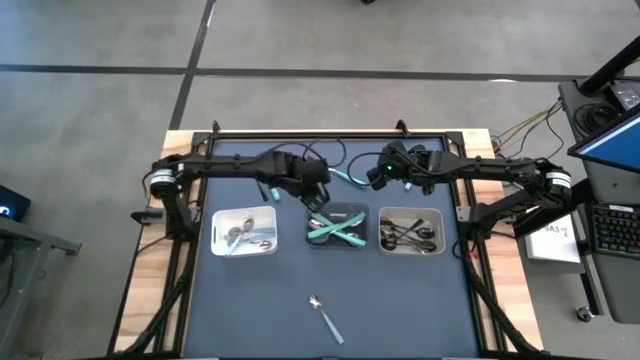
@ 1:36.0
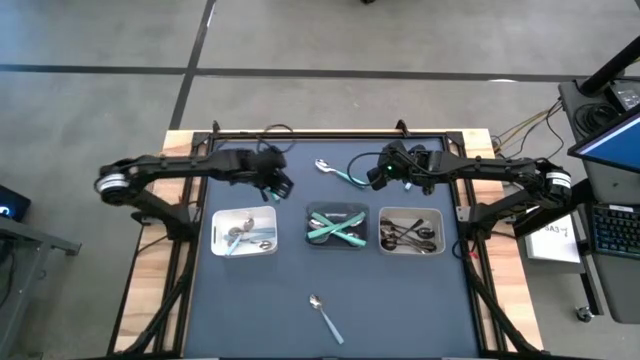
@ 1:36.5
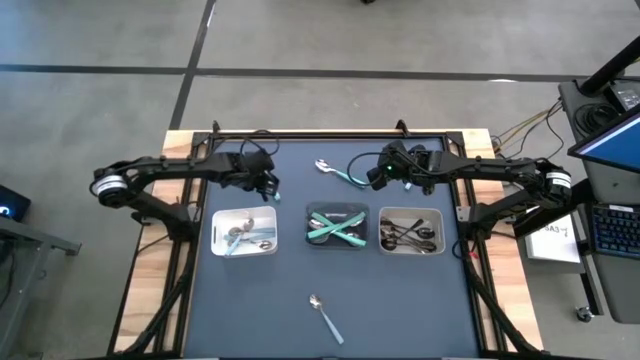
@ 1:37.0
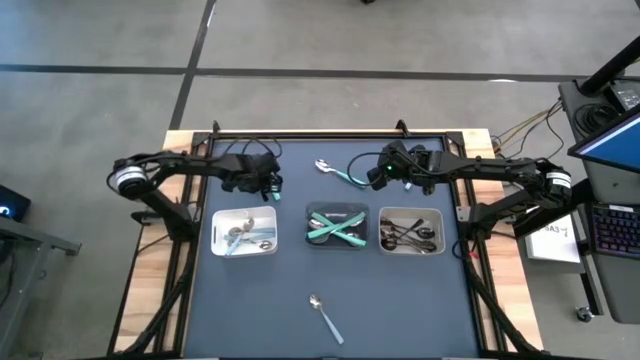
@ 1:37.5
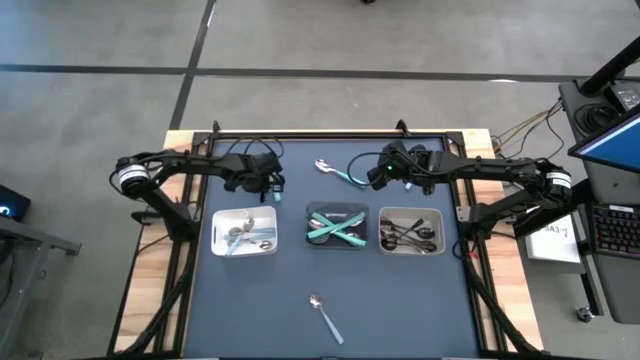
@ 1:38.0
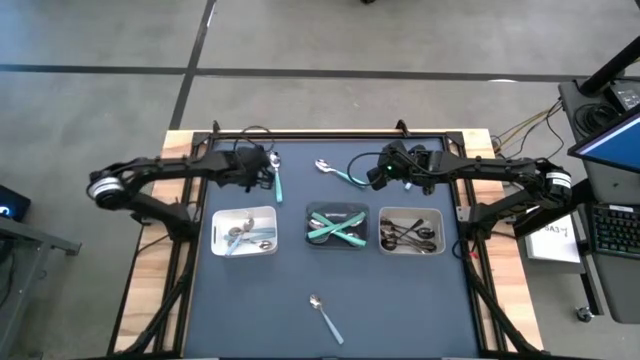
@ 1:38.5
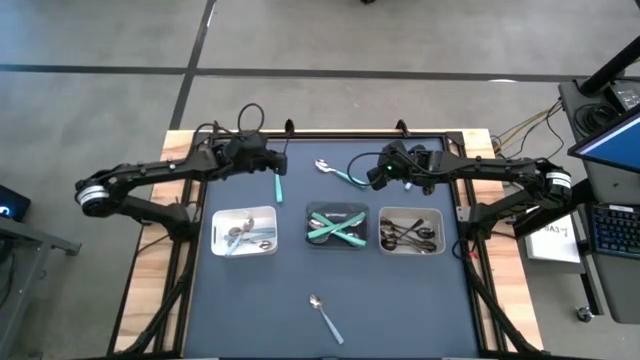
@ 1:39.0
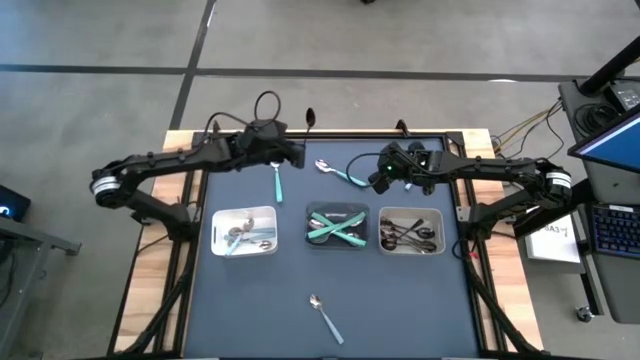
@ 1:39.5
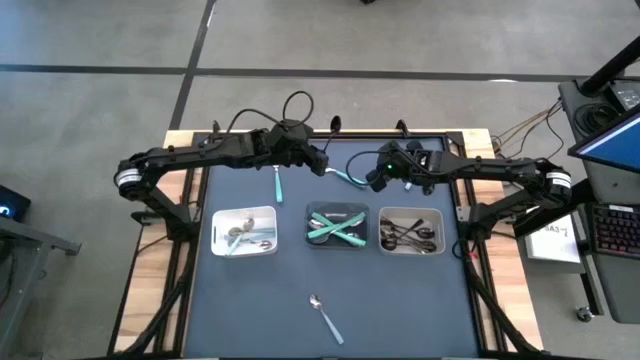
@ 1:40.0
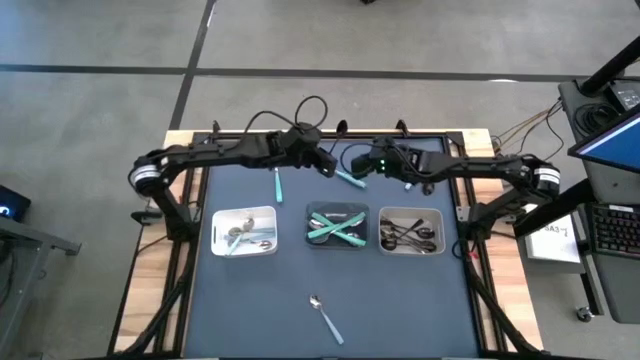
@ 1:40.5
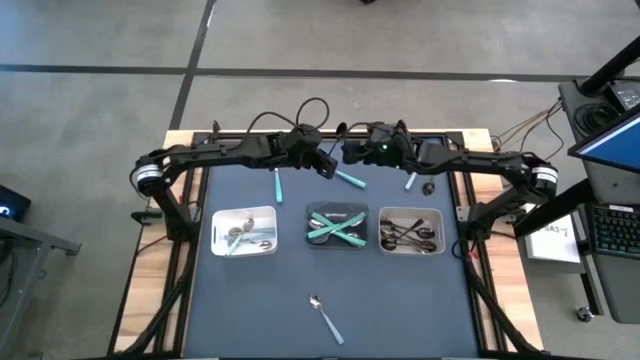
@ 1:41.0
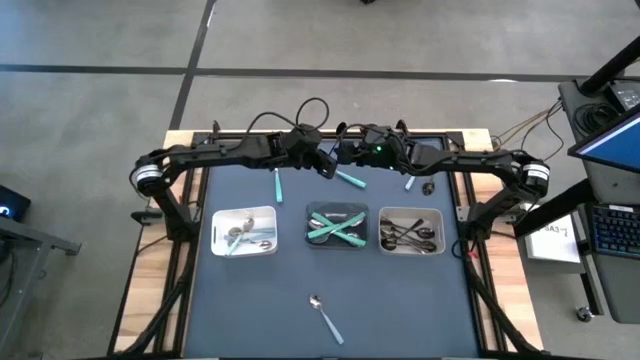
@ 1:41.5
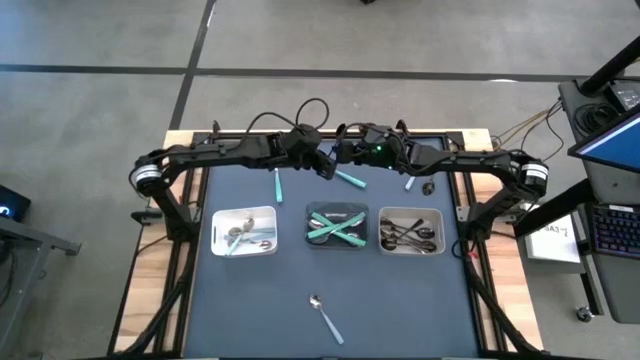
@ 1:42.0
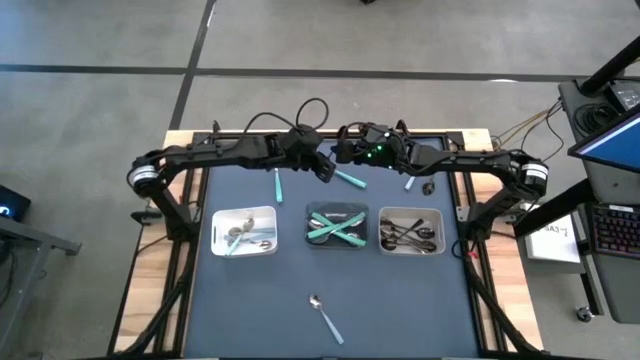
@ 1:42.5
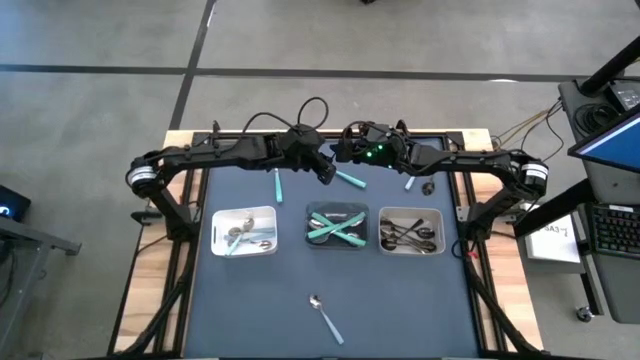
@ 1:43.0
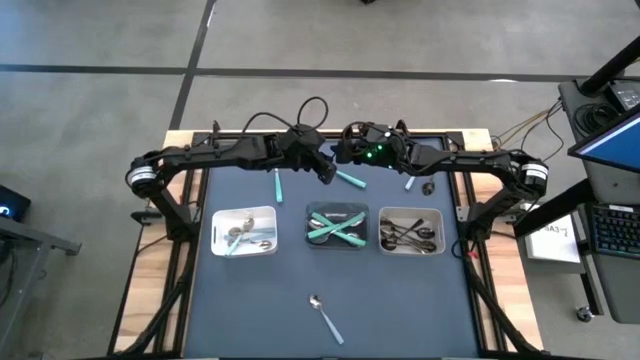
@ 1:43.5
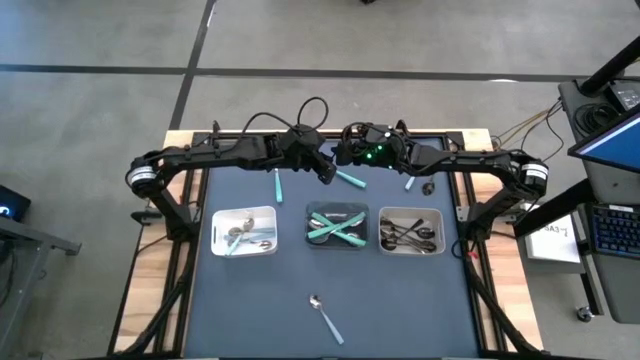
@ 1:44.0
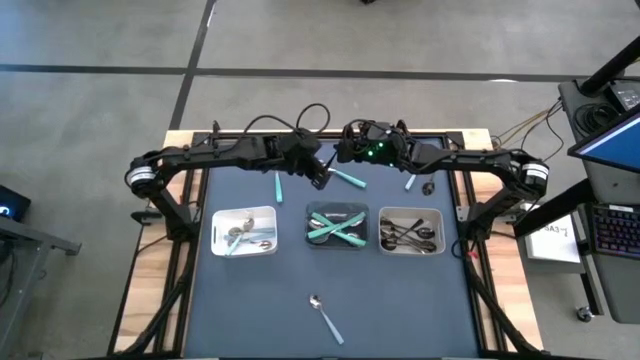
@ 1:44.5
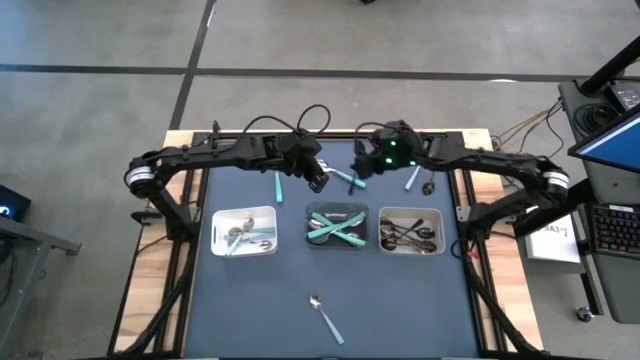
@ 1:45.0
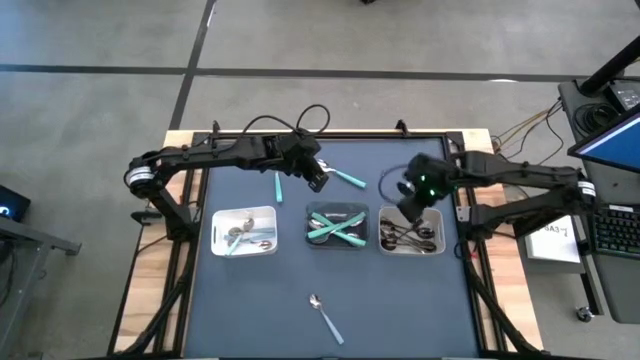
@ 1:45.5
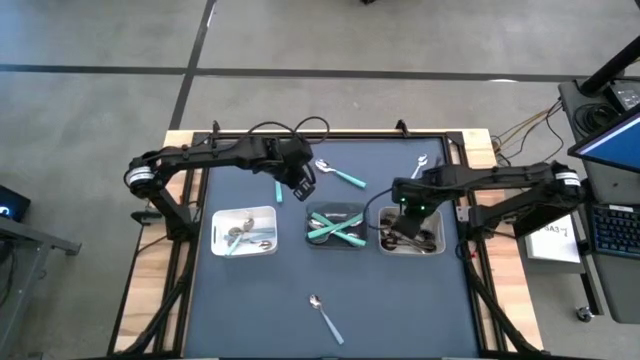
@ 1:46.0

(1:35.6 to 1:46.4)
Task: Sort silverware by color (type)
Put the black spoon into the gray bin

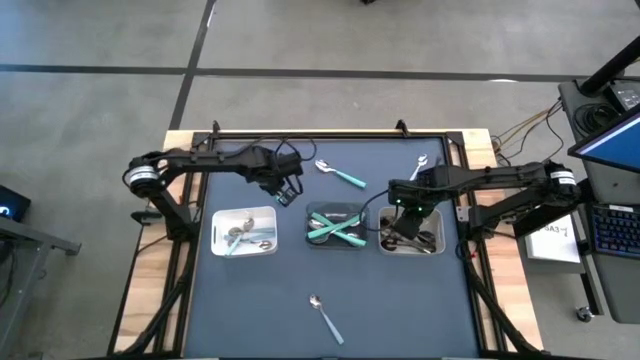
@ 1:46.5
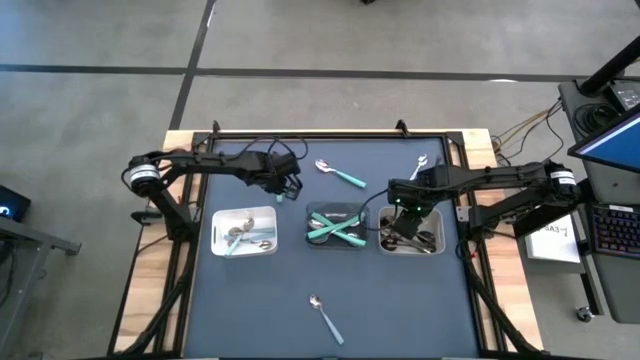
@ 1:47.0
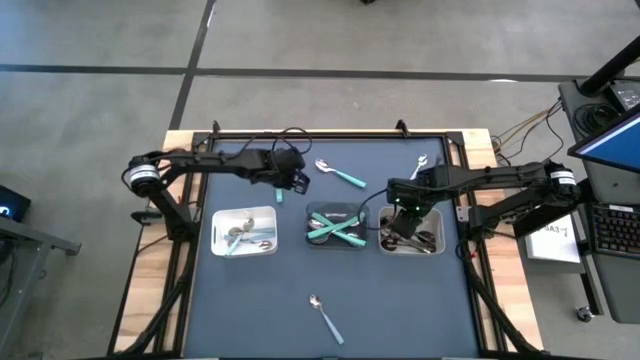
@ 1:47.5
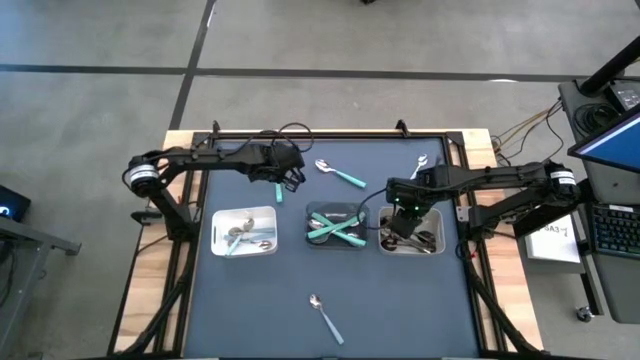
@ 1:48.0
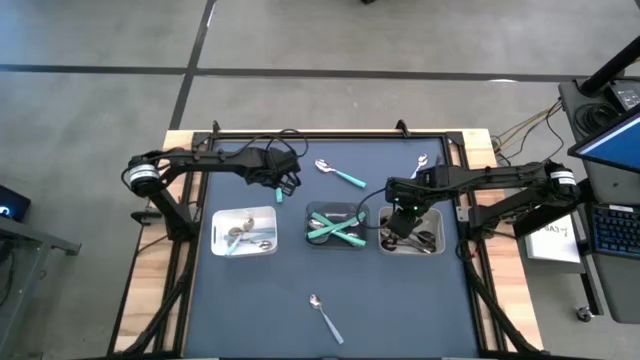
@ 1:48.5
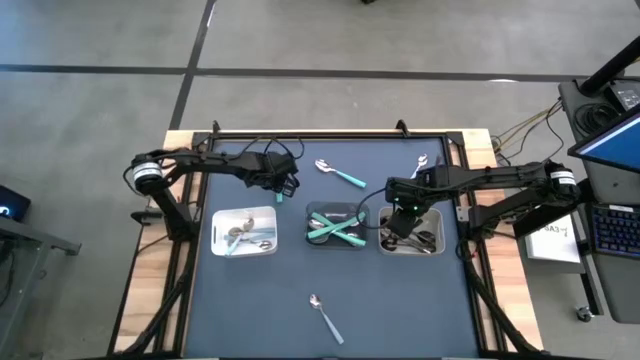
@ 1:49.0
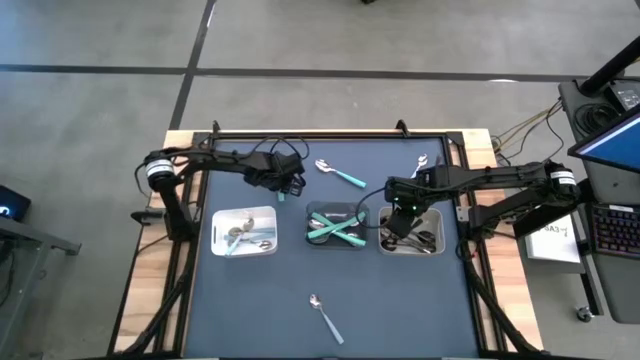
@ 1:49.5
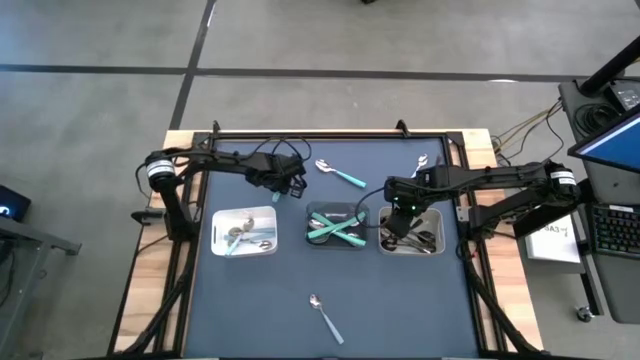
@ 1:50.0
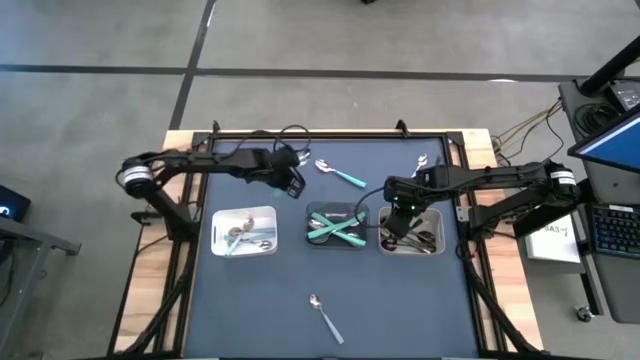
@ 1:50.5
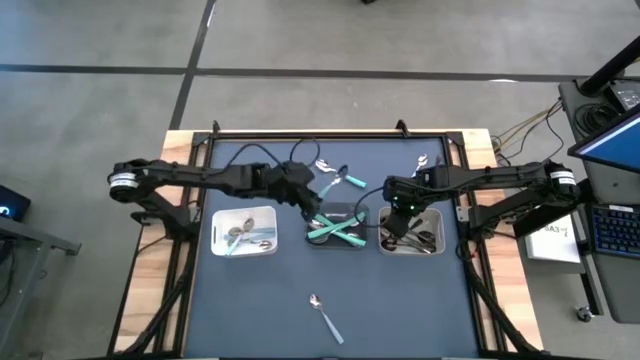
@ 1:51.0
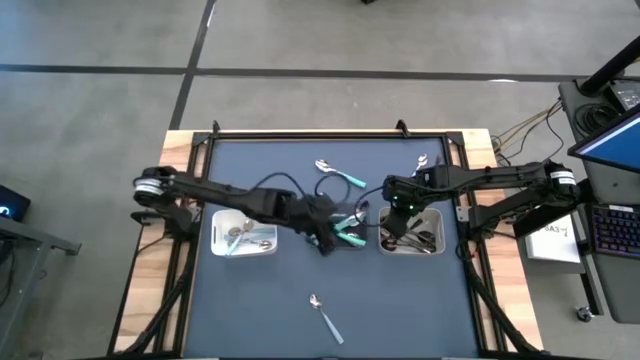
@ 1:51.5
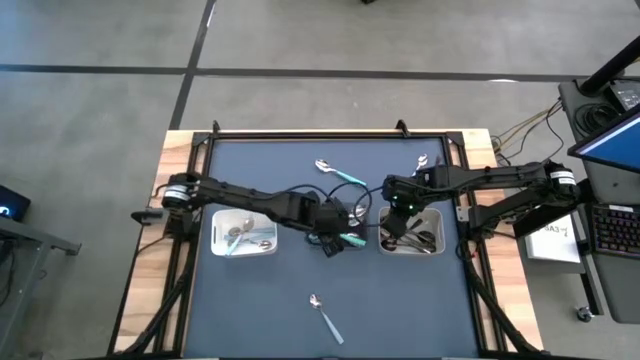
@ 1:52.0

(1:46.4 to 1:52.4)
Put the green spoon into the black transparent bin

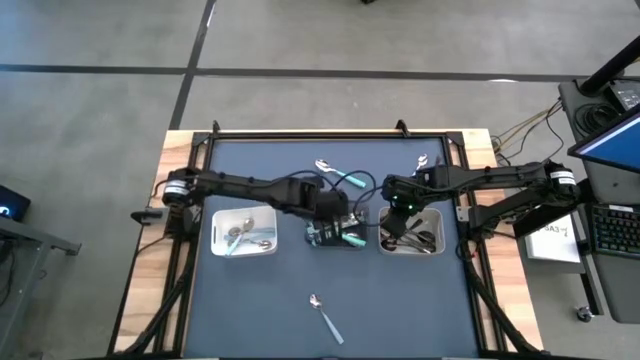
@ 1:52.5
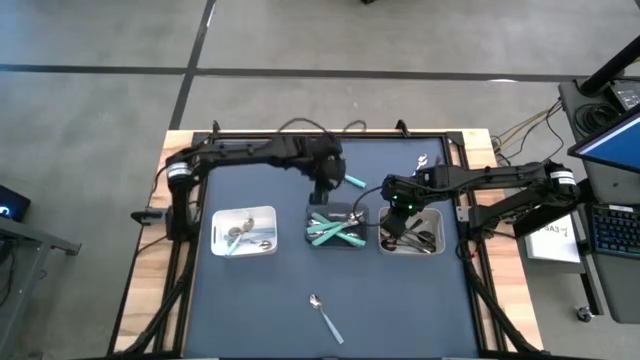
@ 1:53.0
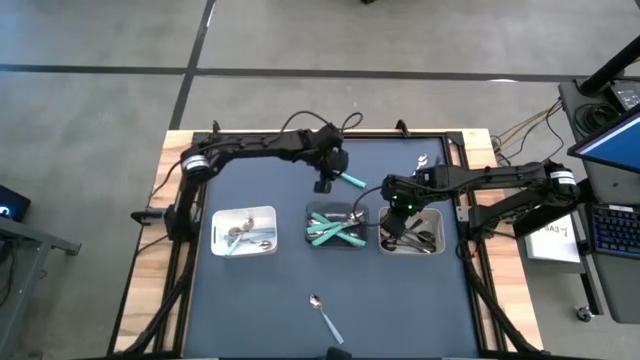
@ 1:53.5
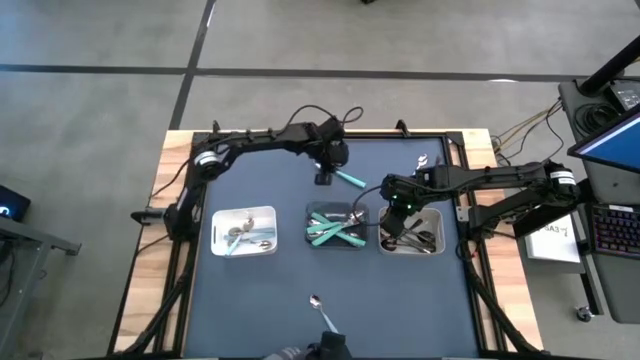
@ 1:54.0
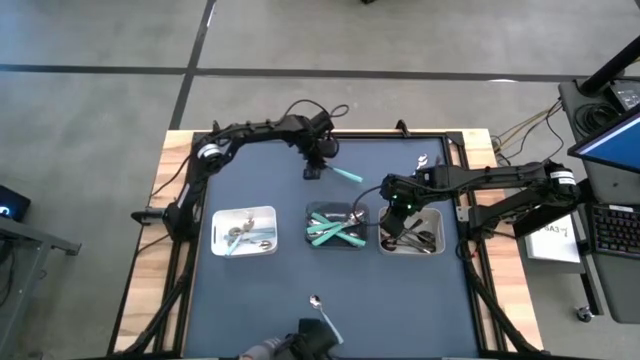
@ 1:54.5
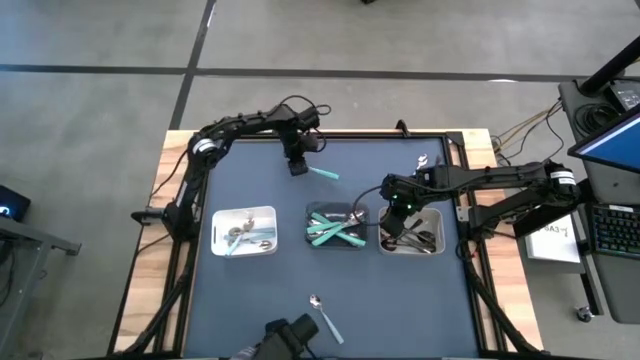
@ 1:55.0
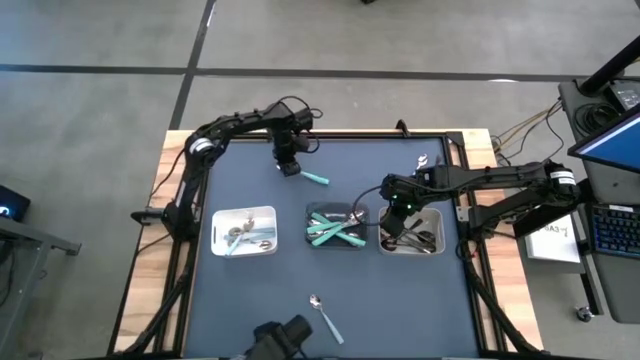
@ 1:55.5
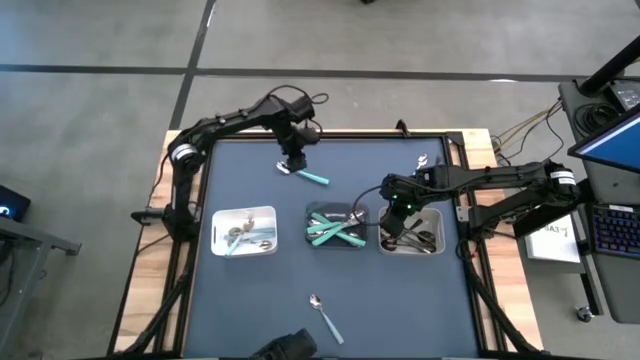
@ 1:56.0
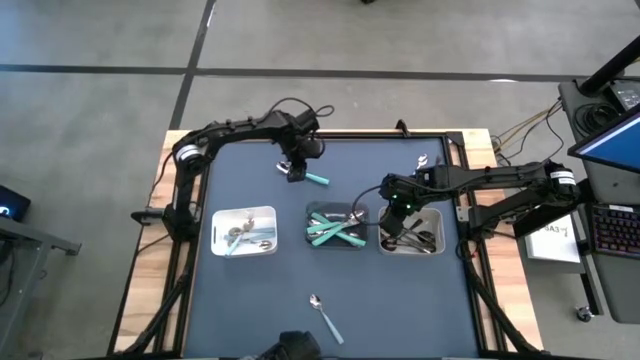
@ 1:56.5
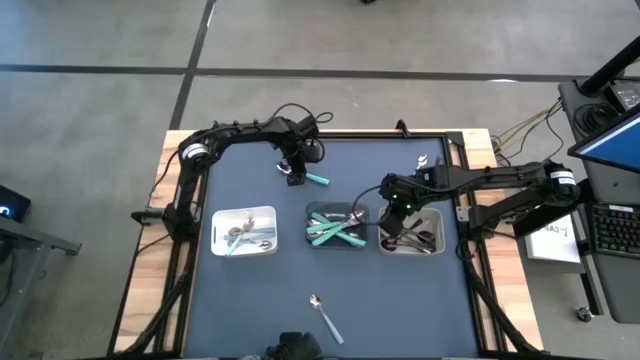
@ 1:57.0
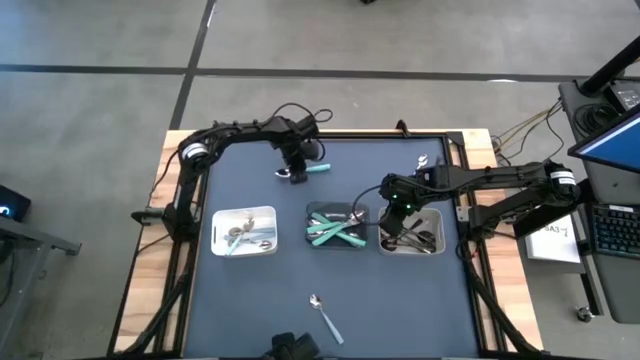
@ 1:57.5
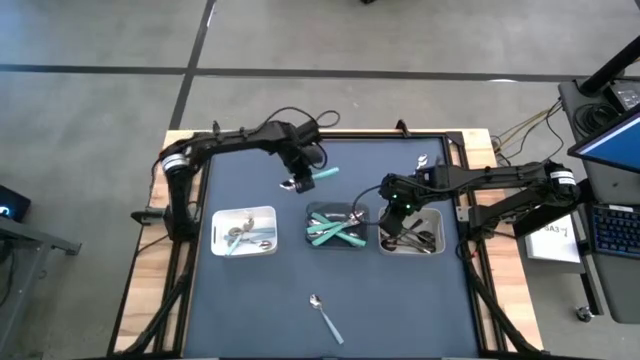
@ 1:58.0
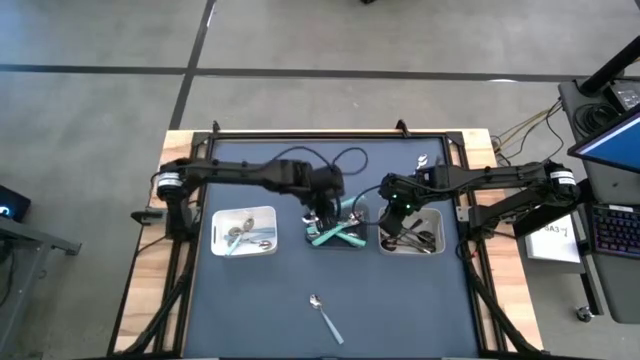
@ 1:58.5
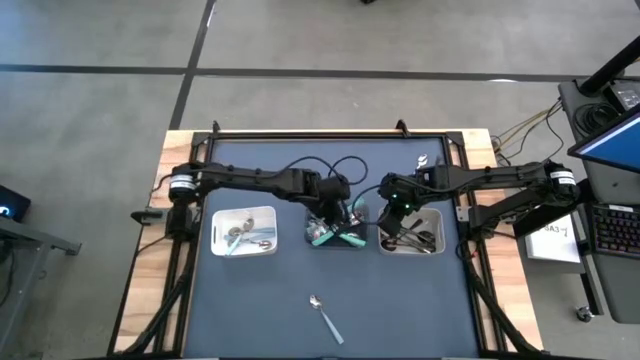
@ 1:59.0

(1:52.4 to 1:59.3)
Put the green spoon into the black transparent bin
